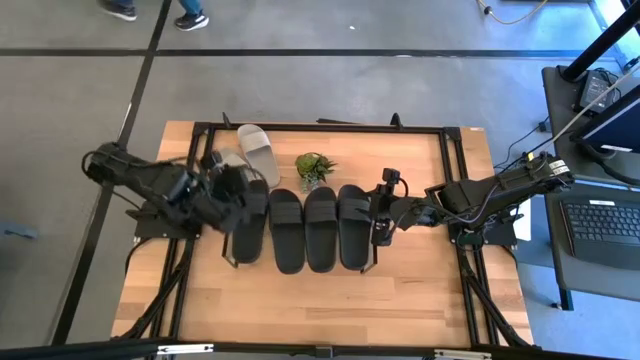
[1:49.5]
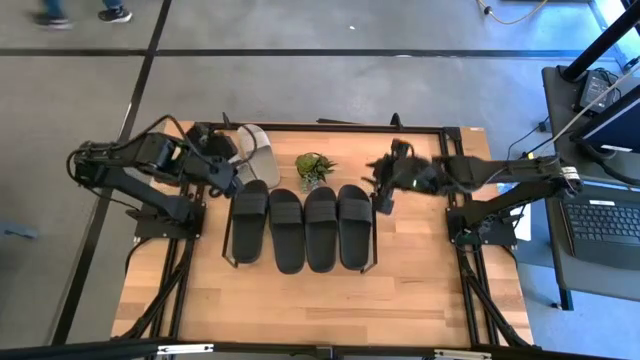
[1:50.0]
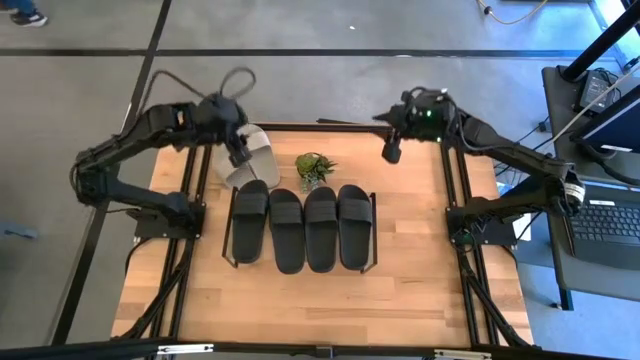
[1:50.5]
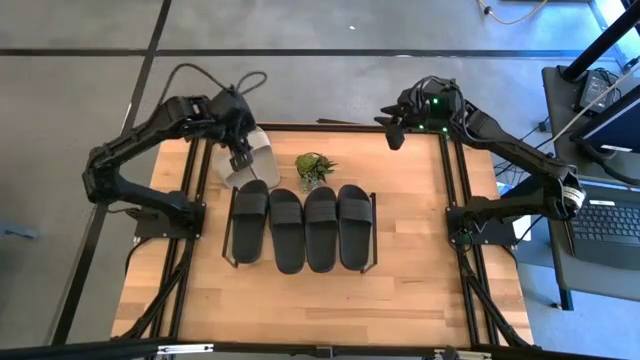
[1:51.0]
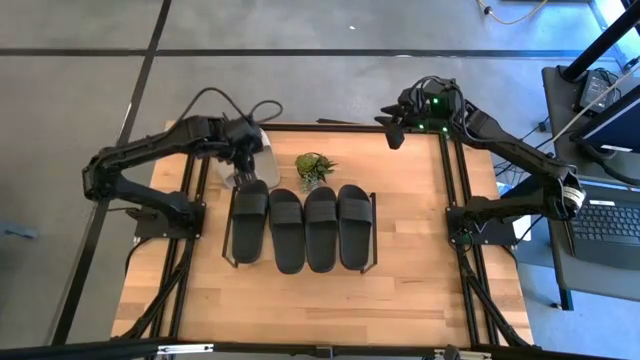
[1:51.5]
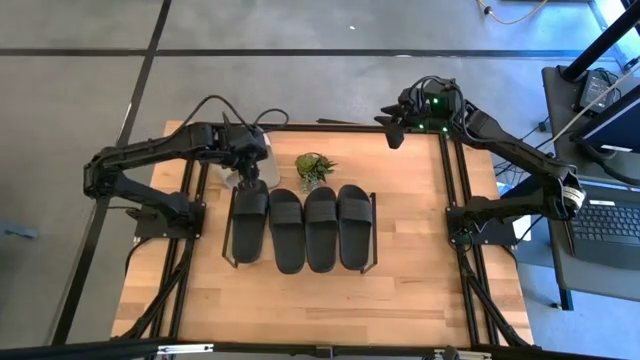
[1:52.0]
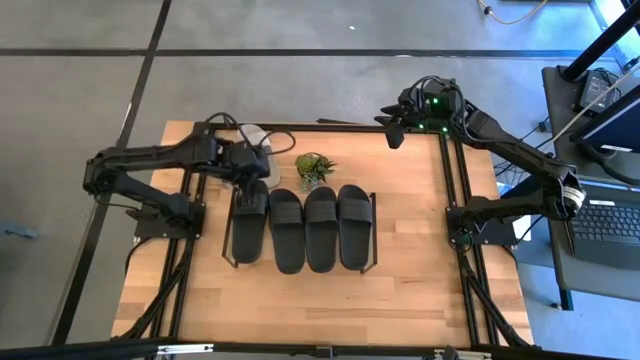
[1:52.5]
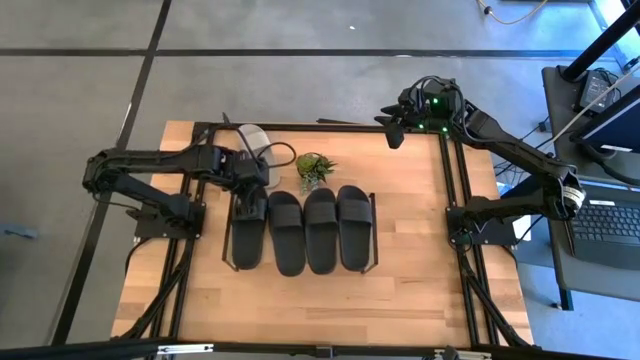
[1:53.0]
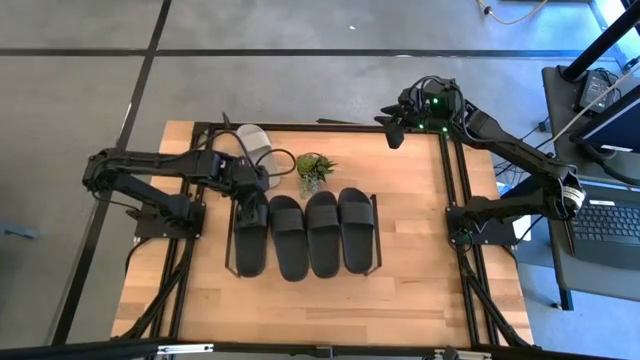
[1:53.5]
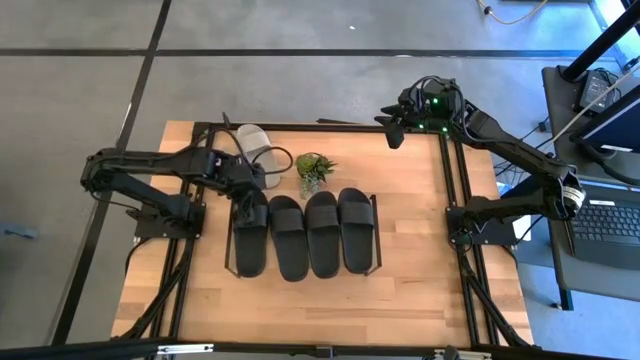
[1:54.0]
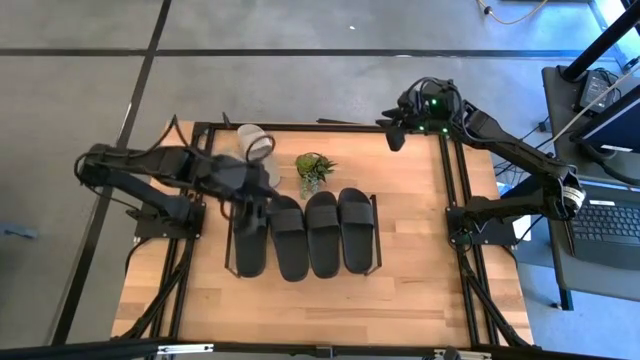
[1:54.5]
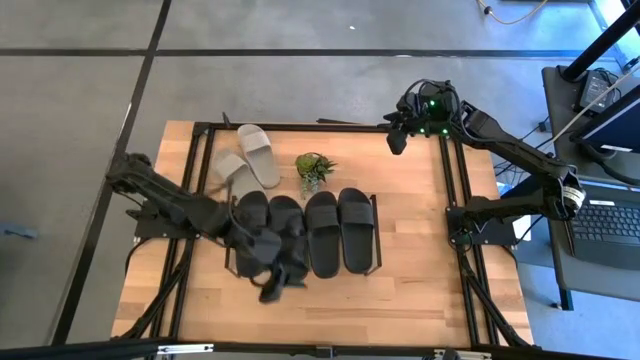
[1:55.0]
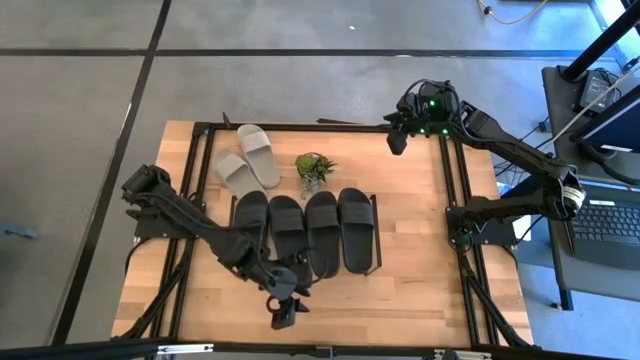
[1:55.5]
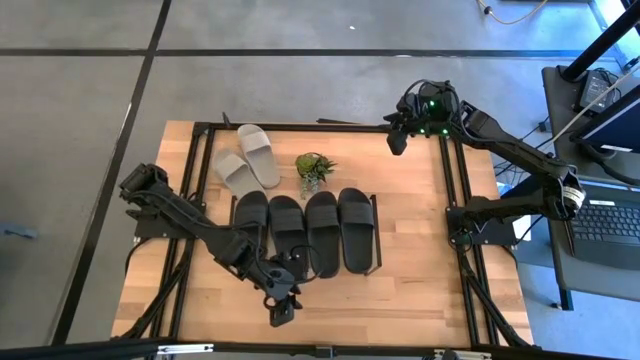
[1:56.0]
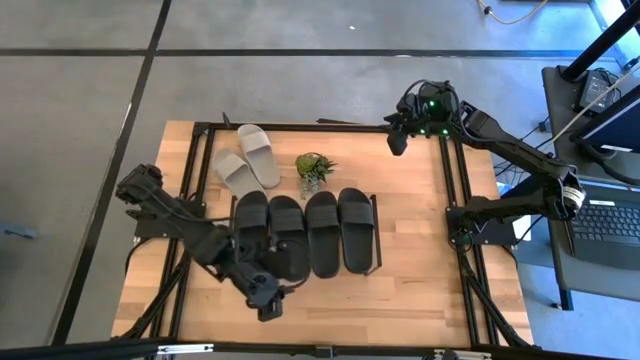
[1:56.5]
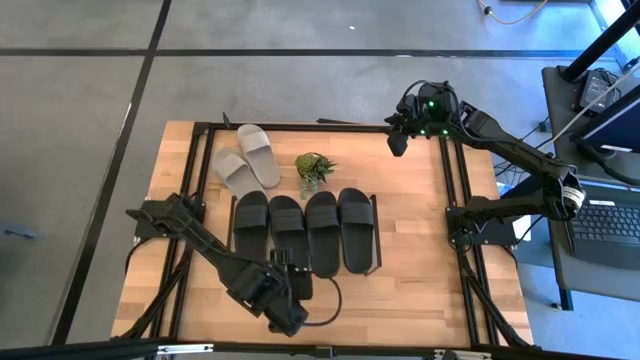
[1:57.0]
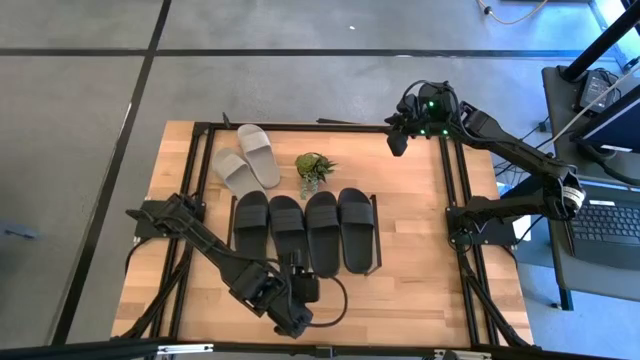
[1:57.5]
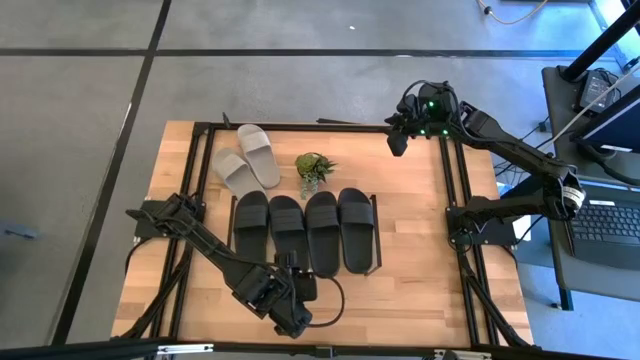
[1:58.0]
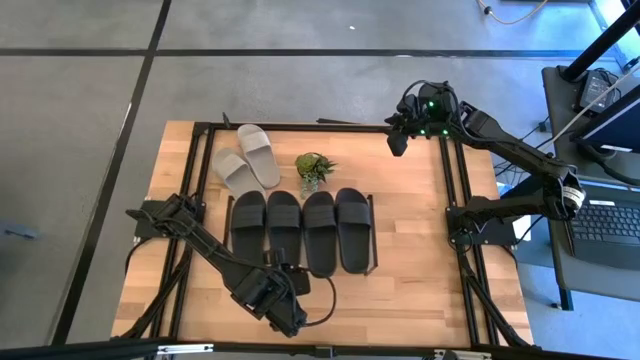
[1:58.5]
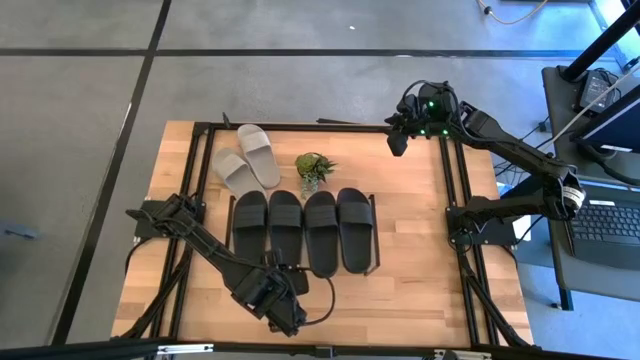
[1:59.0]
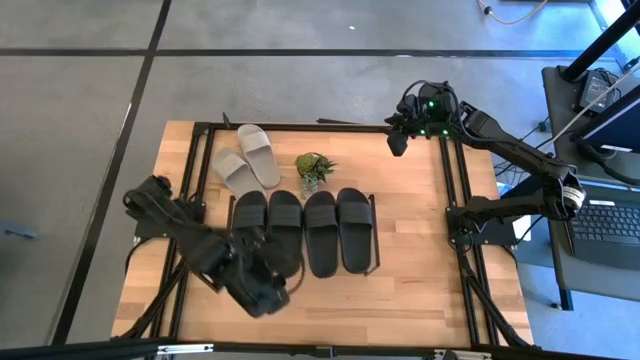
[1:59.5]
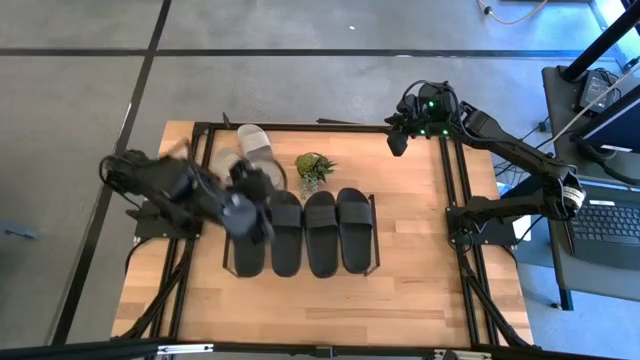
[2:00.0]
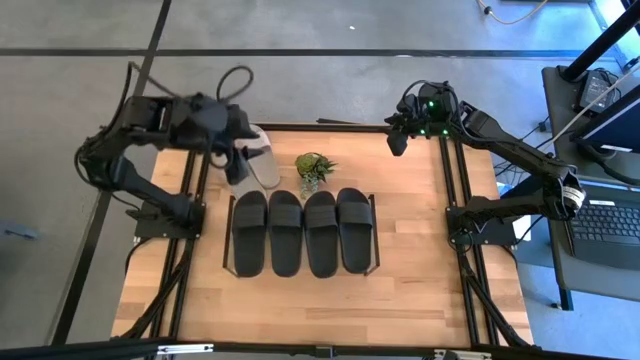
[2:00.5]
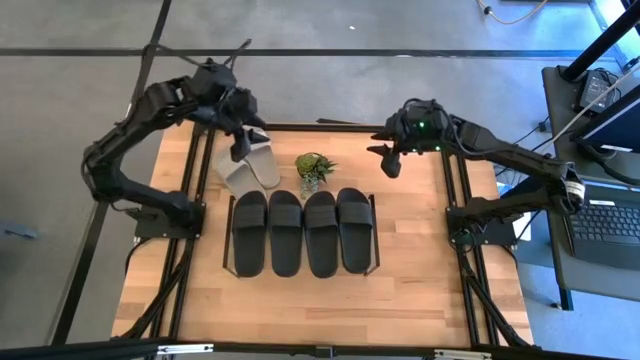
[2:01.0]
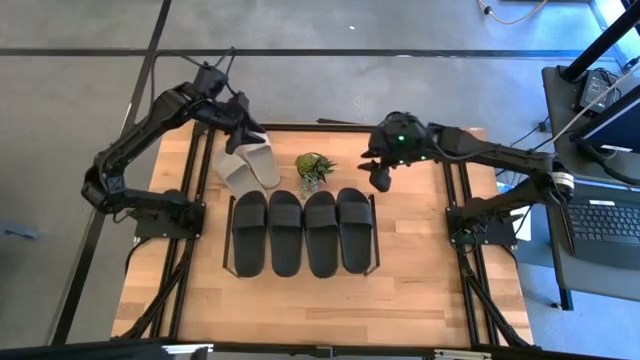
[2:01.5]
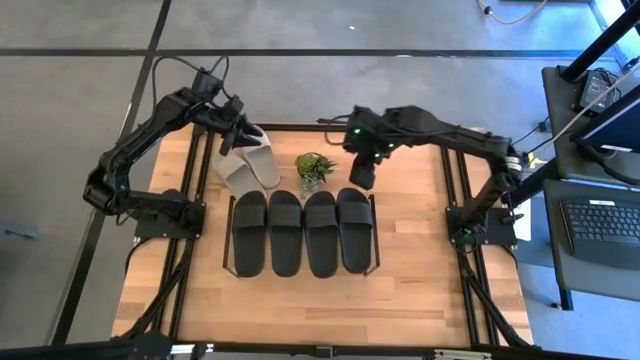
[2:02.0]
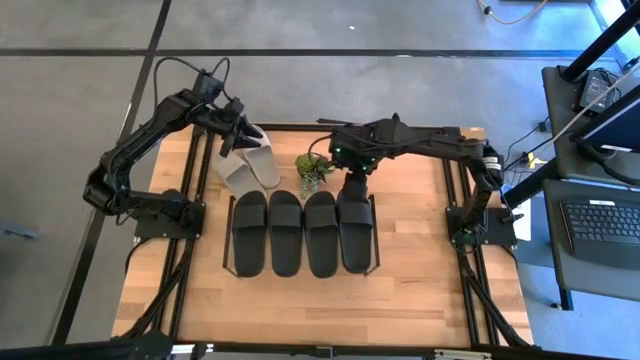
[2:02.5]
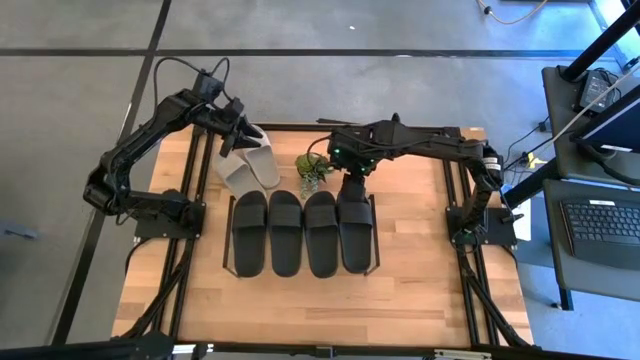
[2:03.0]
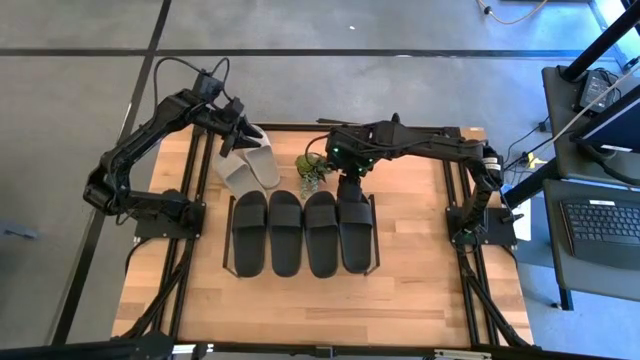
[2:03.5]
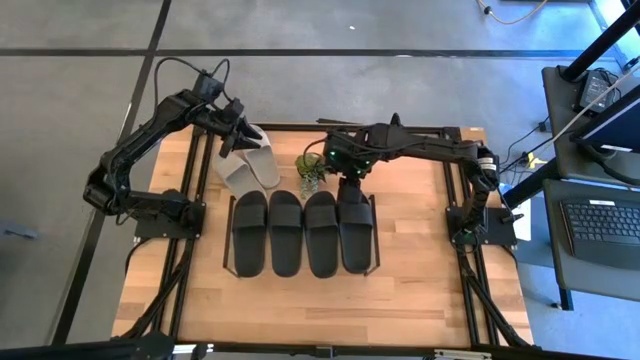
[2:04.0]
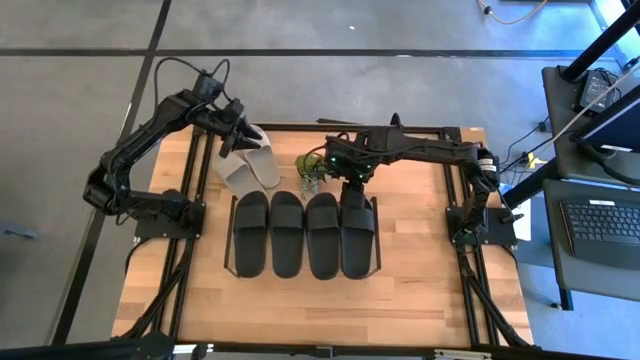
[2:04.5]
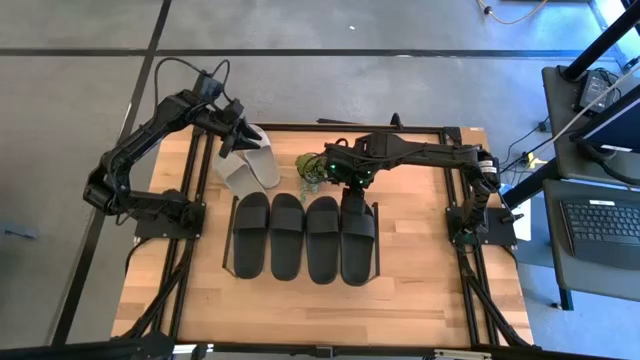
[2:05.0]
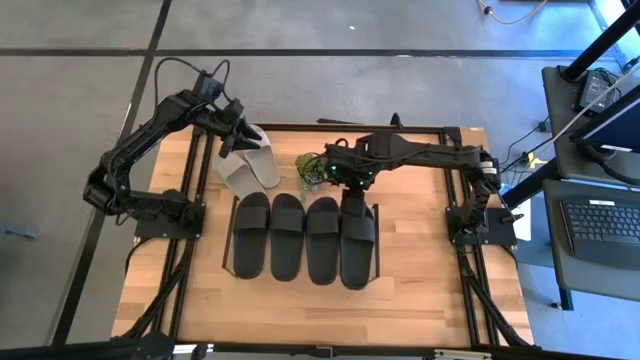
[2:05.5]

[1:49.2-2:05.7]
Task: Pick and place slides into the shelf
Adjust the black slides on the shelf

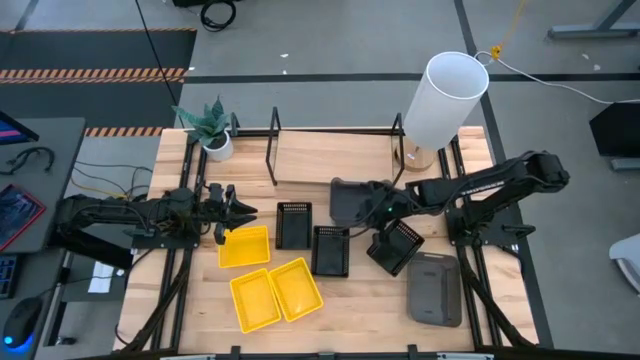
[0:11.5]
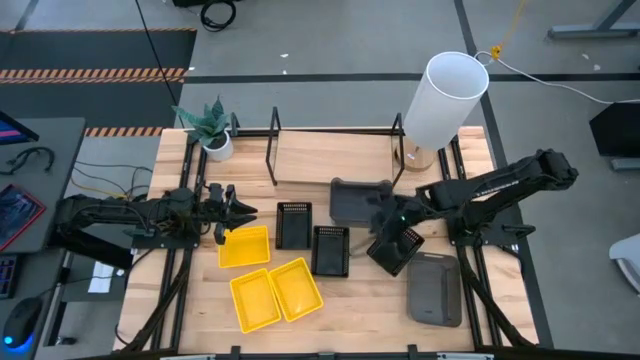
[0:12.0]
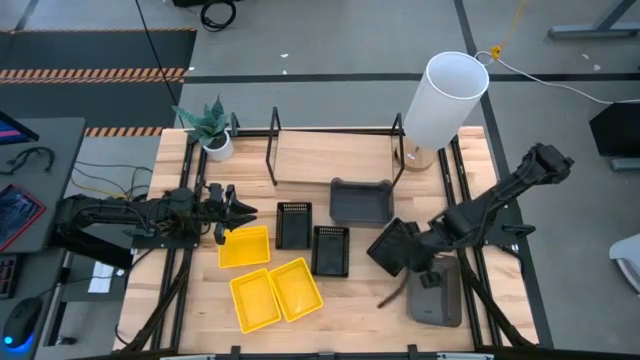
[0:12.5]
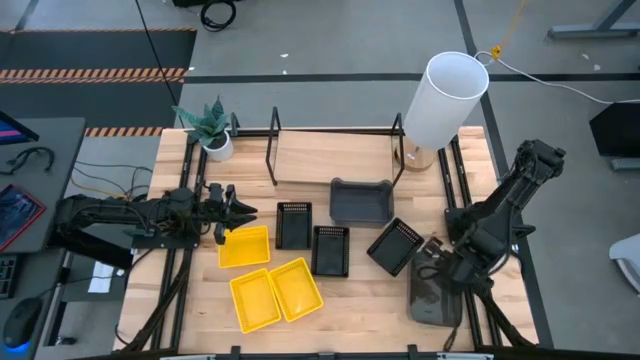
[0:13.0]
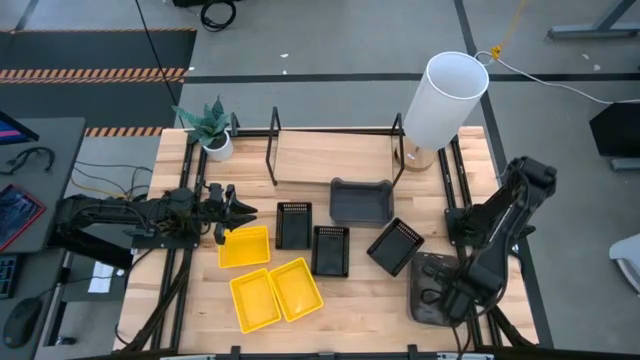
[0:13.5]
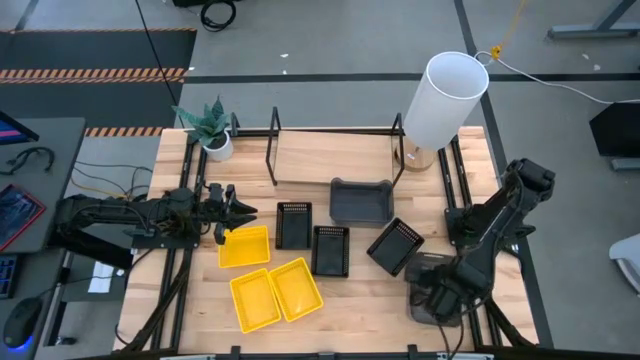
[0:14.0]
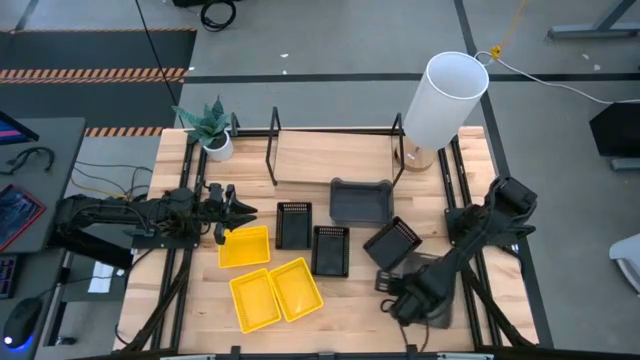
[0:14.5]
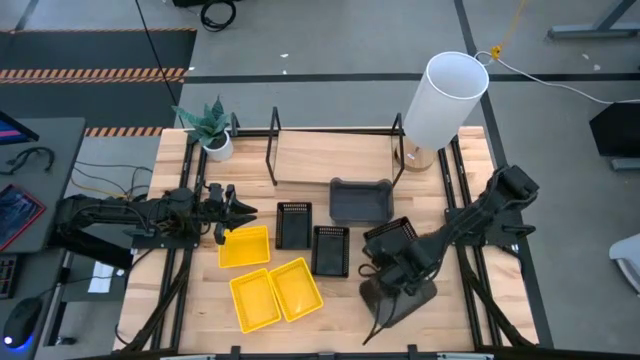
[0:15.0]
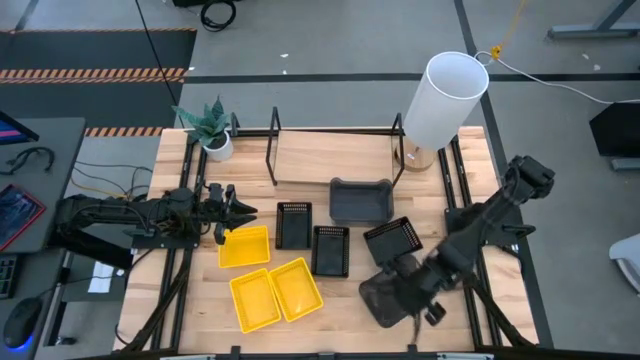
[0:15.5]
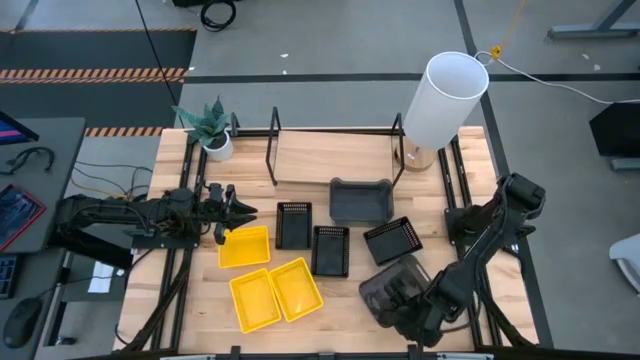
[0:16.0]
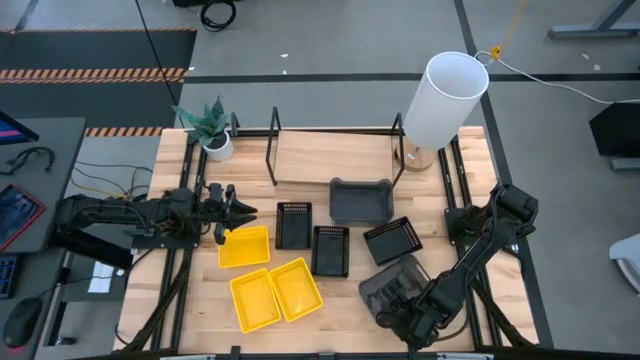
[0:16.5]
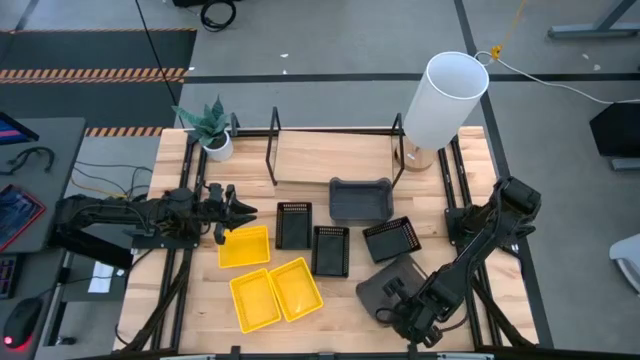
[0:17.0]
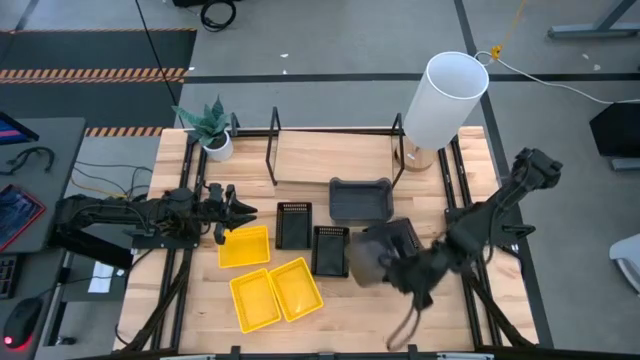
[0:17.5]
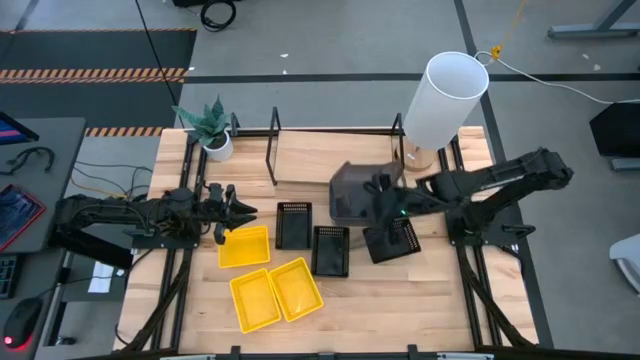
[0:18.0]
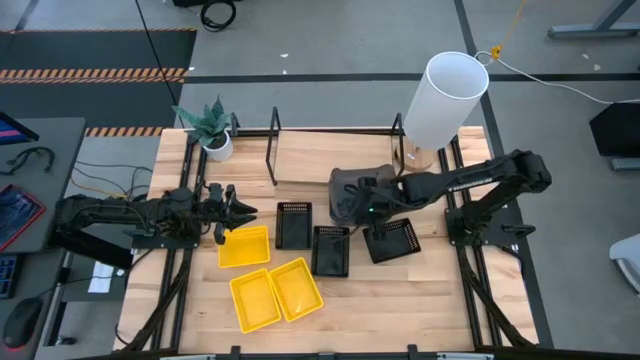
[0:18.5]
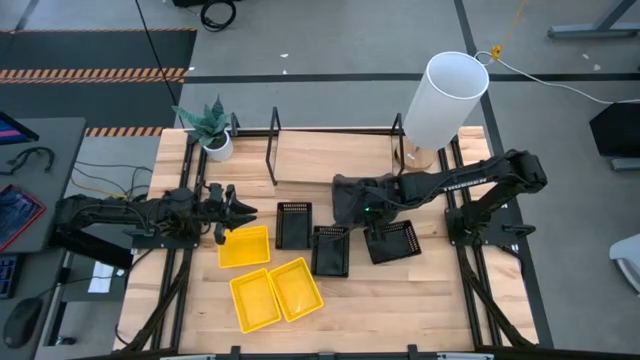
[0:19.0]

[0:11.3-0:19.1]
Task: Stack baskets on shelf by color
Stack the bottom gray bin on top of the top stacked gray bins
